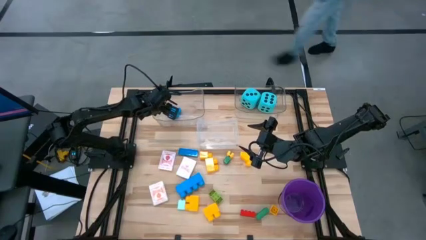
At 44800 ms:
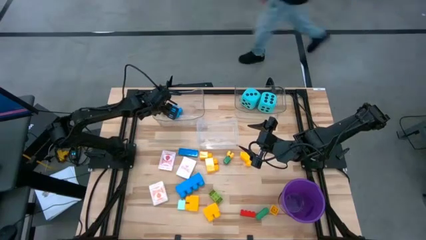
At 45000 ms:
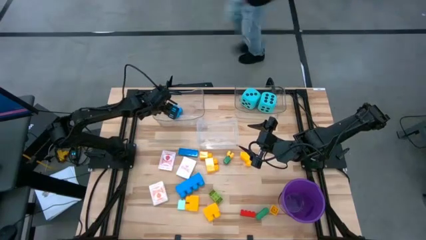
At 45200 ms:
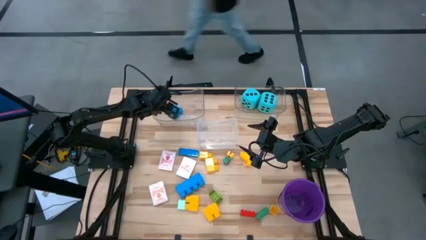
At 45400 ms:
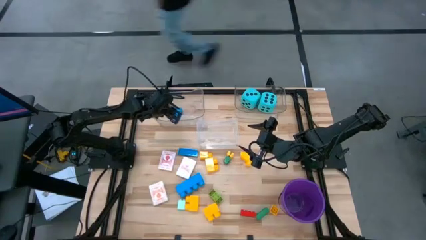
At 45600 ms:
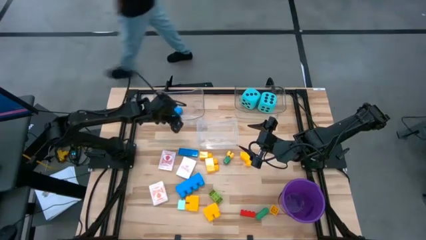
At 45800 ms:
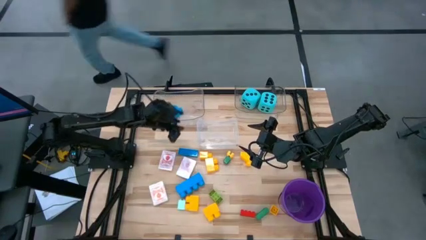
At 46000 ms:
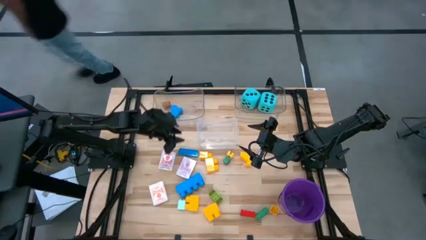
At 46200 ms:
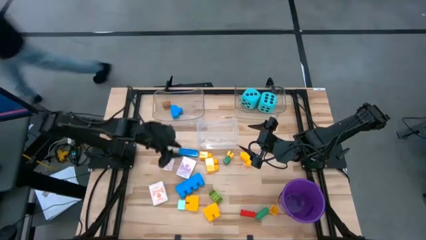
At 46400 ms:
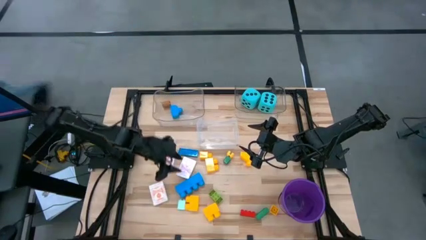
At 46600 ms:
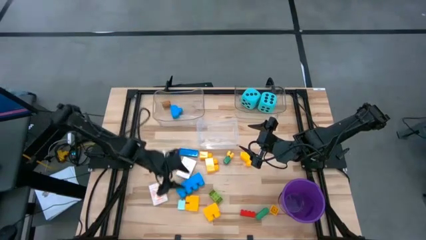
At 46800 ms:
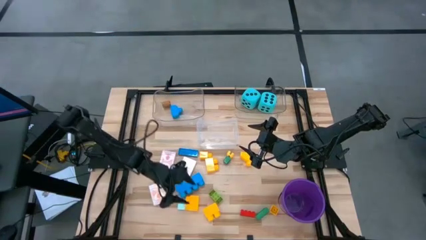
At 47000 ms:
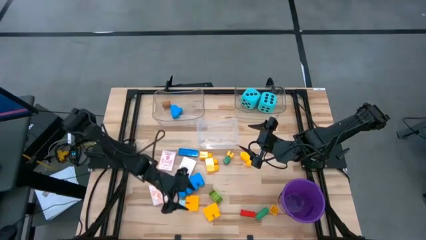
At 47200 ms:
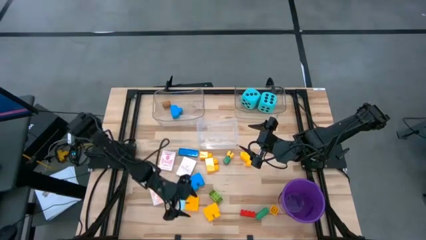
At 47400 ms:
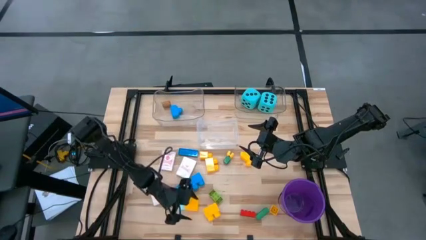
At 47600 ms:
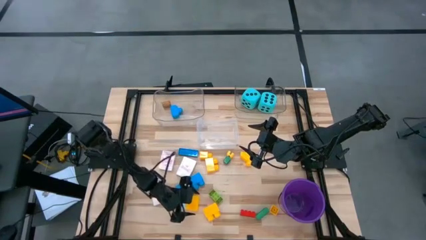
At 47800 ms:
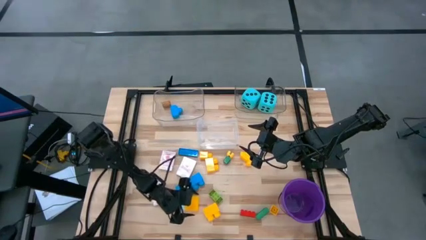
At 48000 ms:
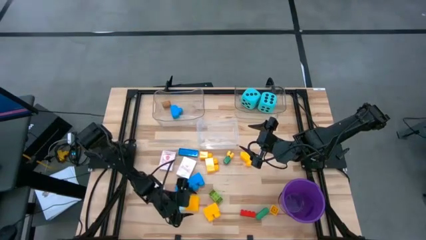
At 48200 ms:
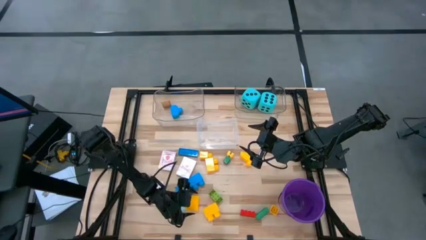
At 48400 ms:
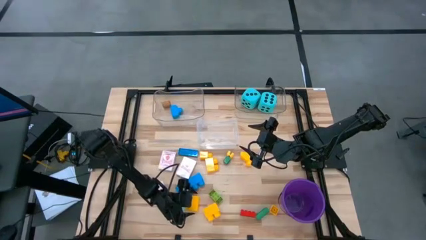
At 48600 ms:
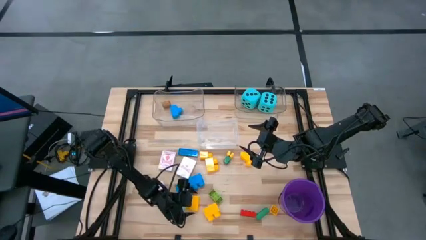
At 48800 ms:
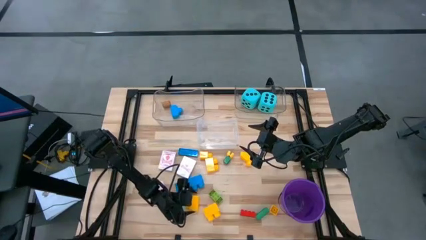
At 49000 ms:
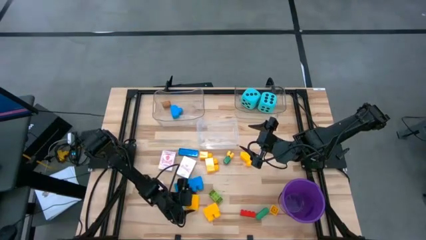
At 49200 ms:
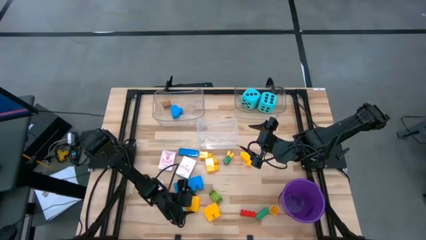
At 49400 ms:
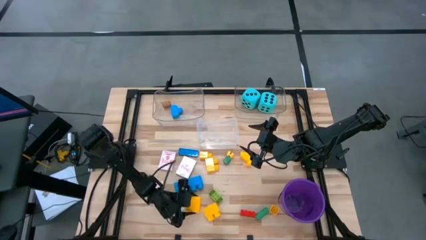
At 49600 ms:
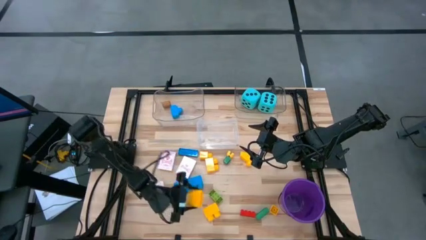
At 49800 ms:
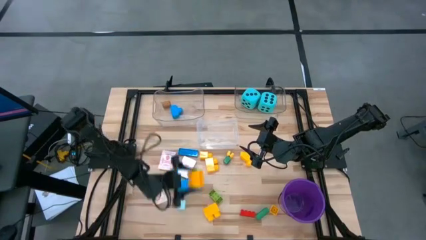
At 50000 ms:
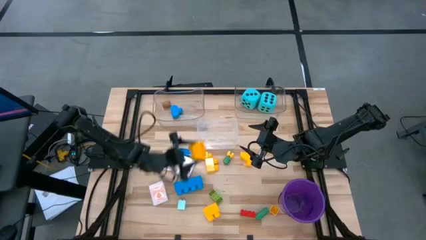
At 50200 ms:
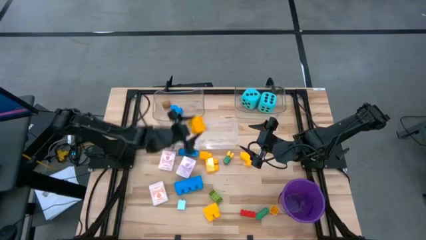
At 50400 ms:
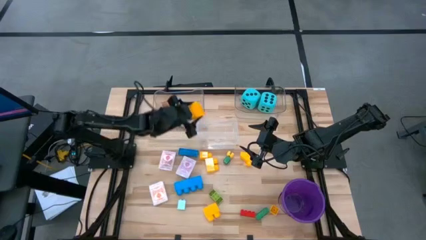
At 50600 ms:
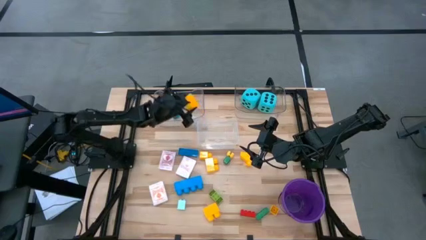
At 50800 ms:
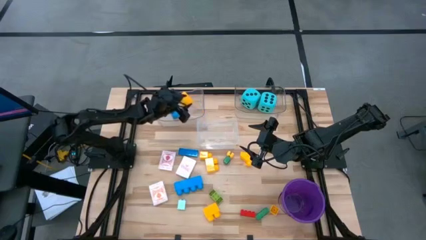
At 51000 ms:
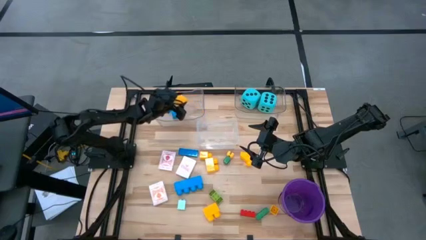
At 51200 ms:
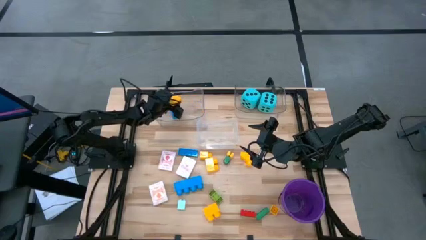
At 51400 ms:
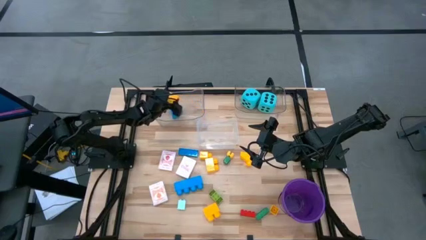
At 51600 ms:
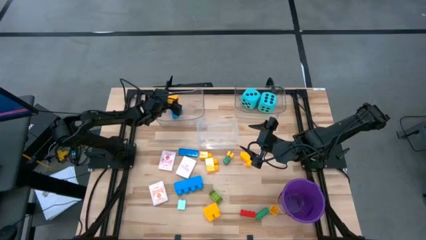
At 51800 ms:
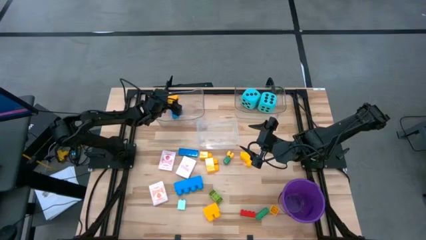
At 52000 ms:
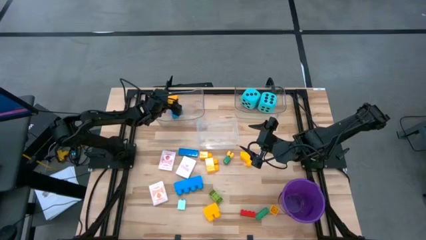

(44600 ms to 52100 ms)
Task: Pick & Place Toys
Put the yellow game piece into the top left transparent bin

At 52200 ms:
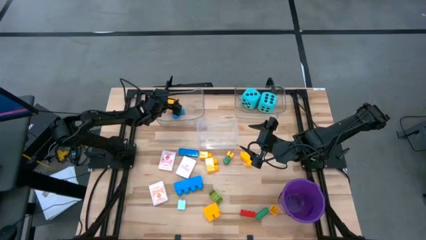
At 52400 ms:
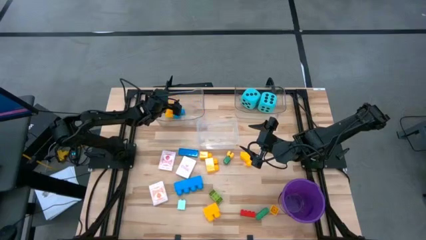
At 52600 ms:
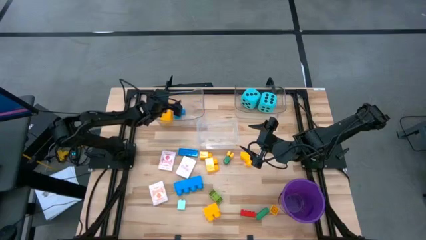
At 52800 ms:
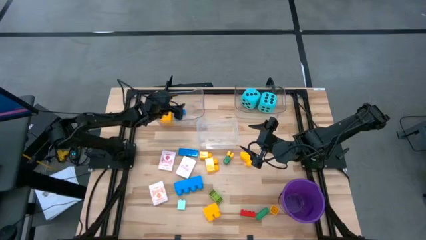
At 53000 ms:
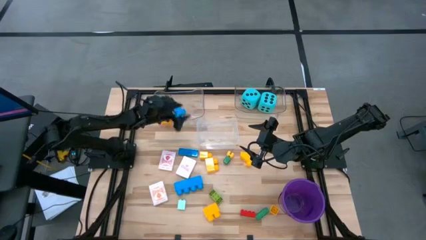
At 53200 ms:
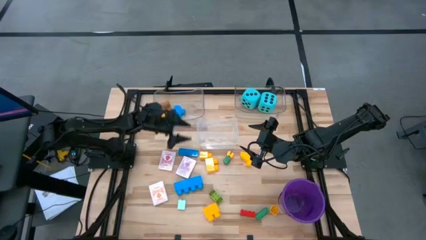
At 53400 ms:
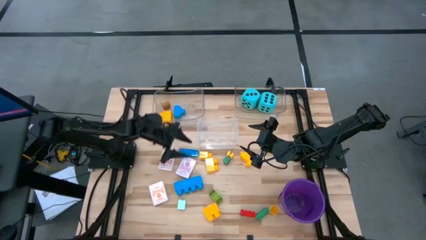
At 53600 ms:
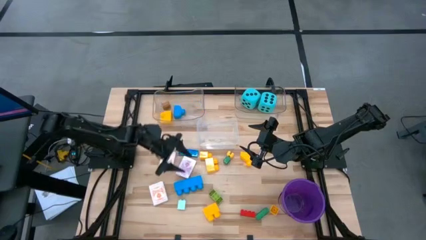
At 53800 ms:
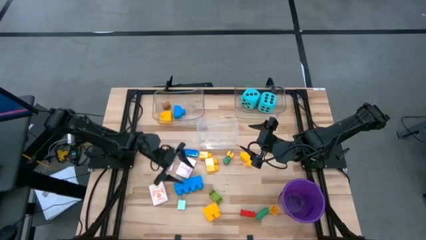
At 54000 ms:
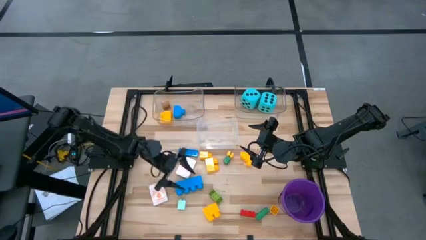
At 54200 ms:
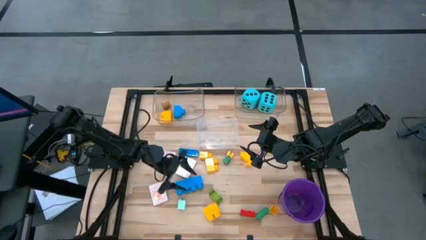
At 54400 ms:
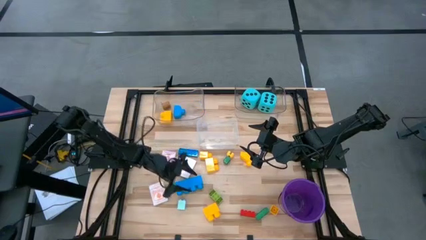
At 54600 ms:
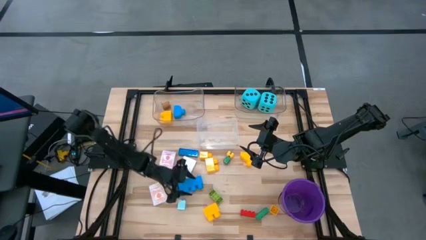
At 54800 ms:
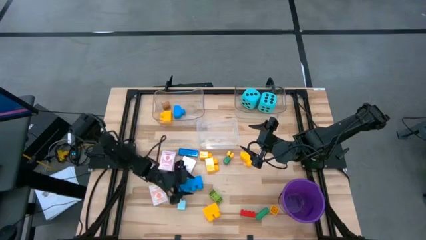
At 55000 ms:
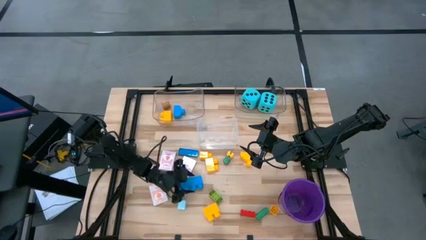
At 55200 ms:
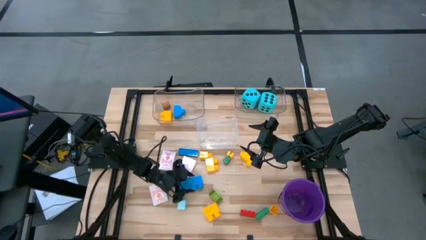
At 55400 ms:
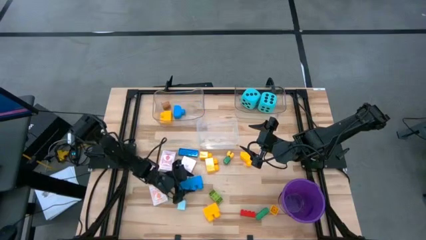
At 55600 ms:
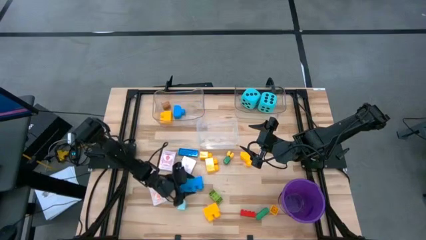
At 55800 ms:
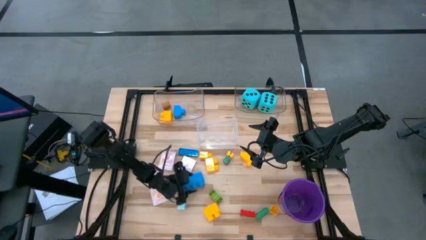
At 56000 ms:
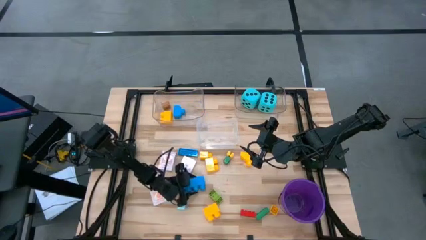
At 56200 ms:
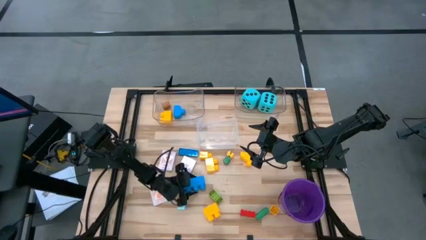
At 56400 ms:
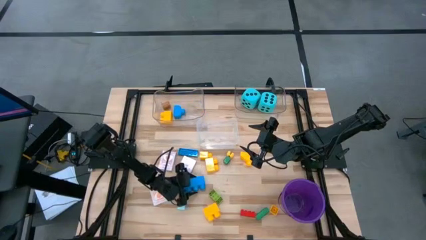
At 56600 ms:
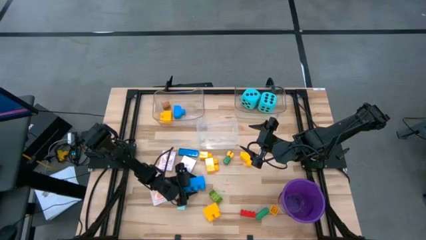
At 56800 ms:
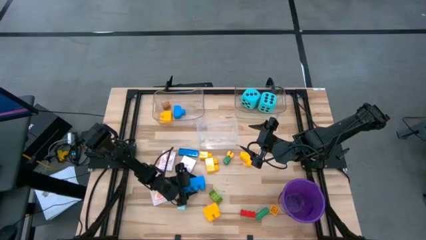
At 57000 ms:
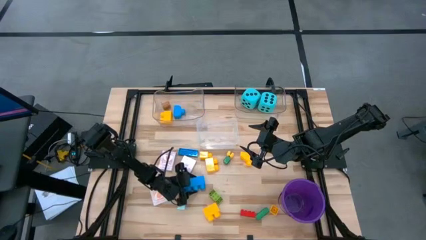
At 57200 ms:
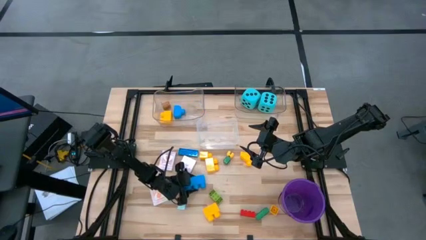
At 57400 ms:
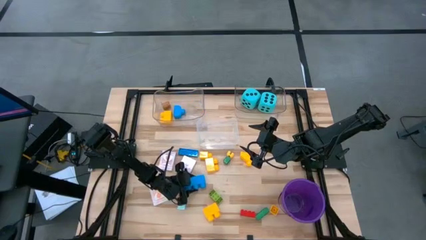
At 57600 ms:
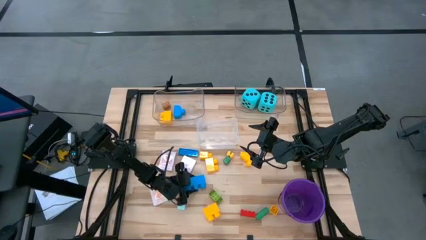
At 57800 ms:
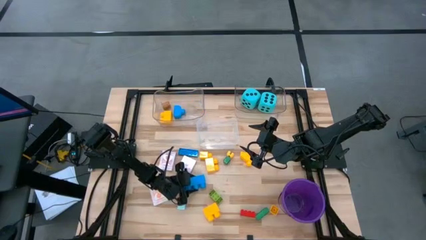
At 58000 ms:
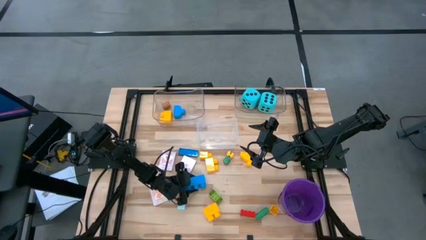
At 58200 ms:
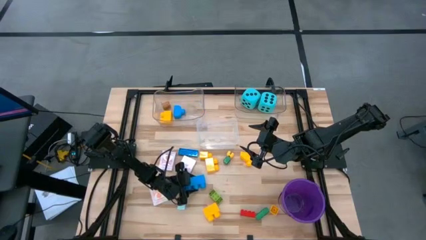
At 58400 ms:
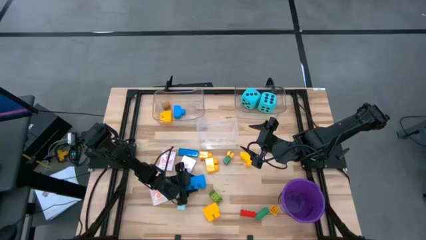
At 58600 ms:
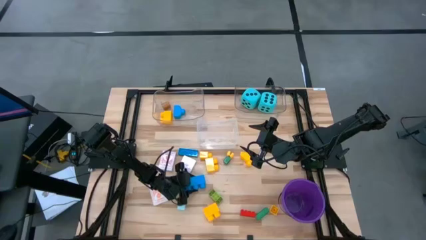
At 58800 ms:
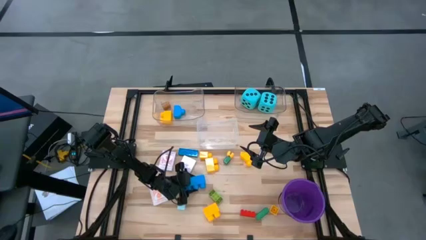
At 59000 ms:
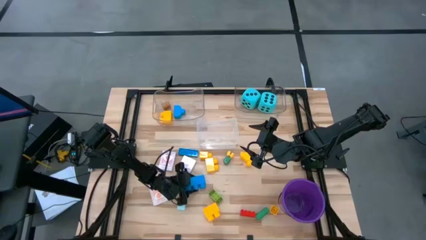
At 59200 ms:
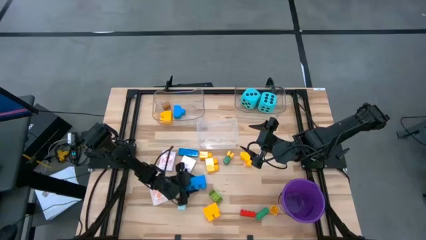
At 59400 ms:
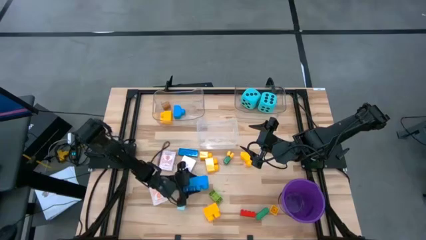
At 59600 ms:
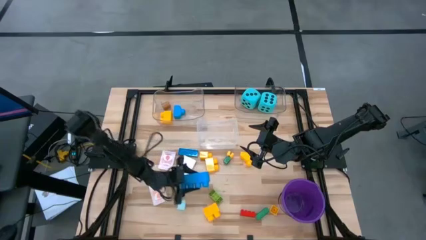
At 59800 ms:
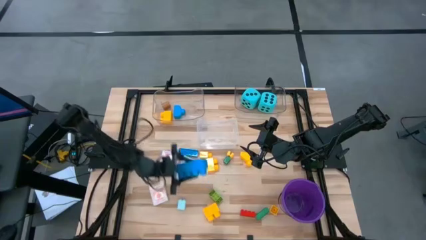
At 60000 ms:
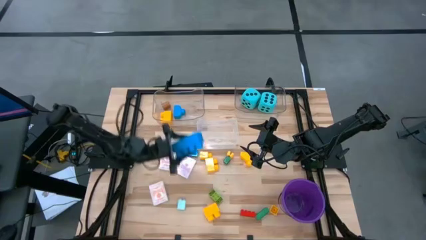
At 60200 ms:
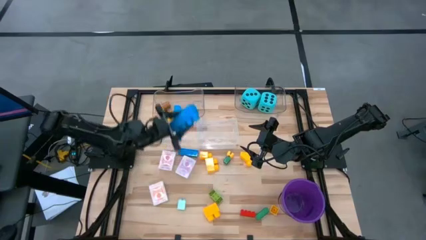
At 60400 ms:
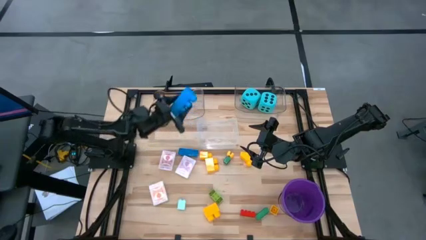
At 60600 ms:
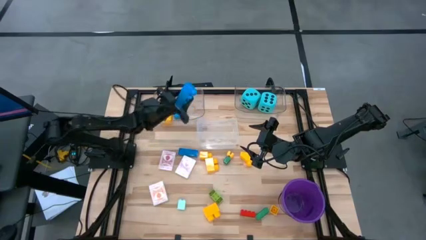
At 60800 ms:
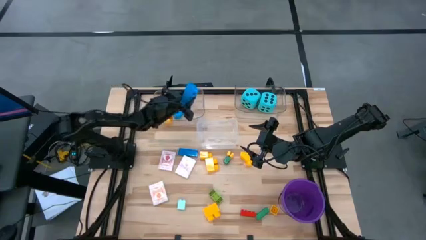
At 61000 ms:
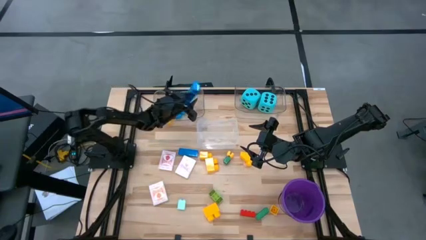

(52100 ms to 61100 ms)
Put the blue game piece into the top left transparent bin
